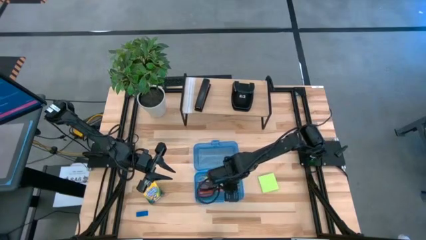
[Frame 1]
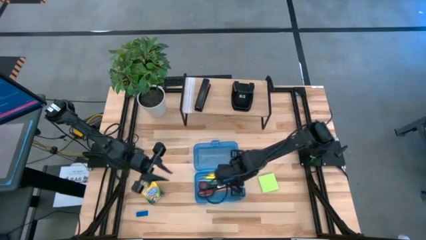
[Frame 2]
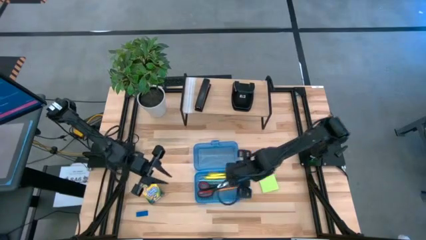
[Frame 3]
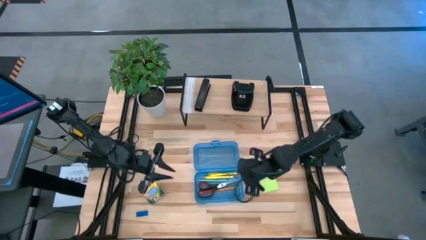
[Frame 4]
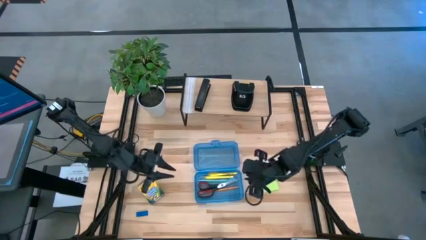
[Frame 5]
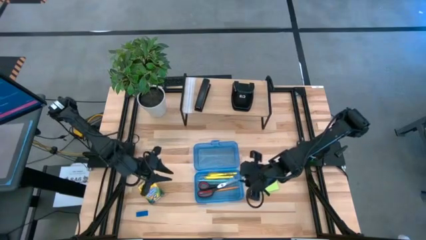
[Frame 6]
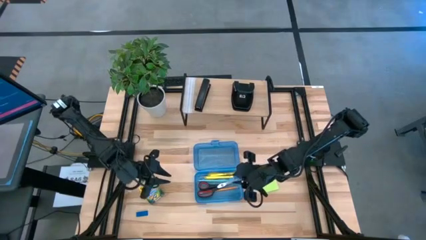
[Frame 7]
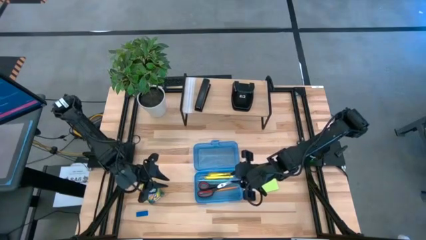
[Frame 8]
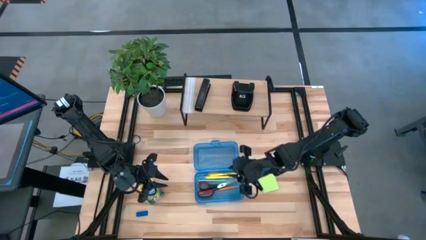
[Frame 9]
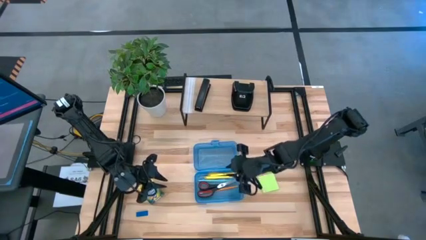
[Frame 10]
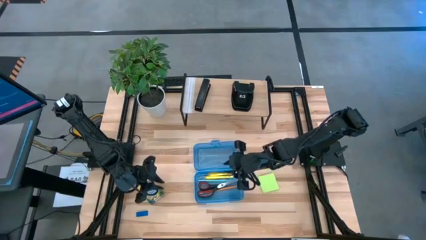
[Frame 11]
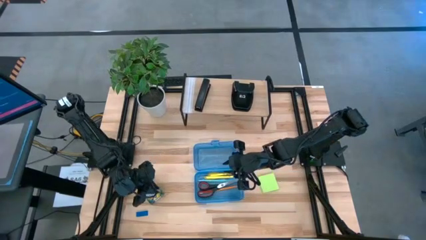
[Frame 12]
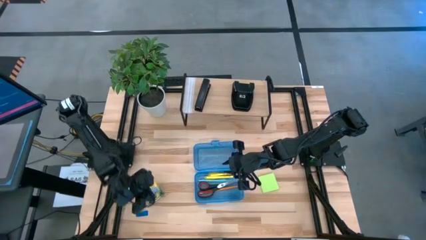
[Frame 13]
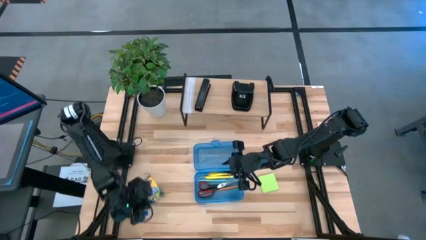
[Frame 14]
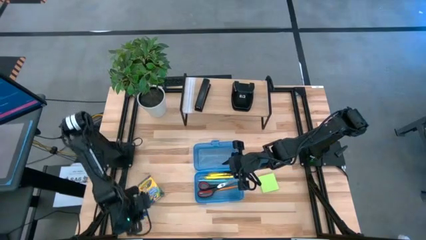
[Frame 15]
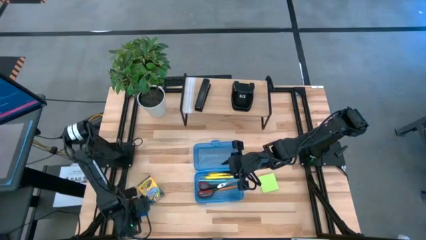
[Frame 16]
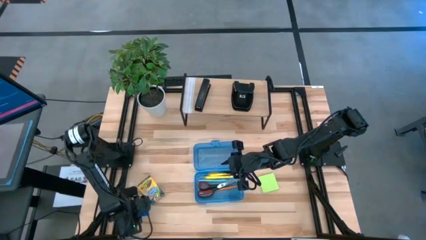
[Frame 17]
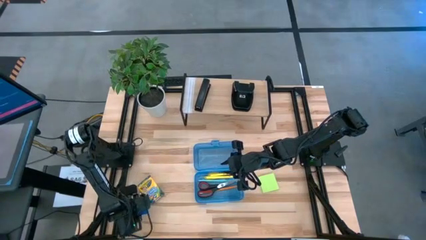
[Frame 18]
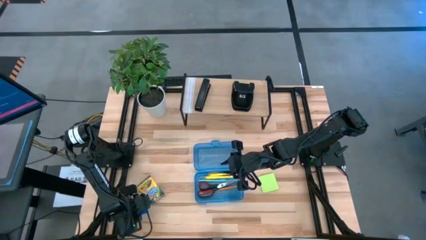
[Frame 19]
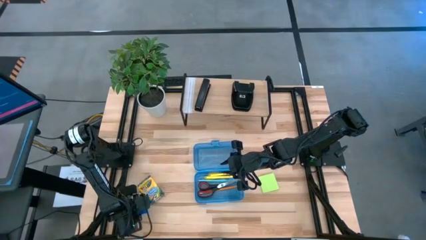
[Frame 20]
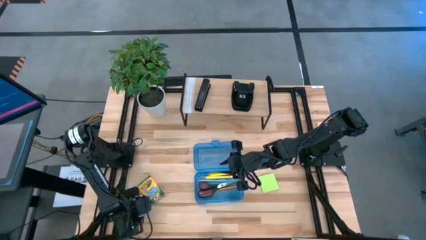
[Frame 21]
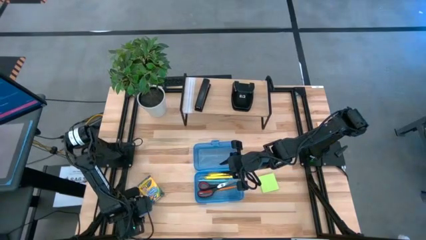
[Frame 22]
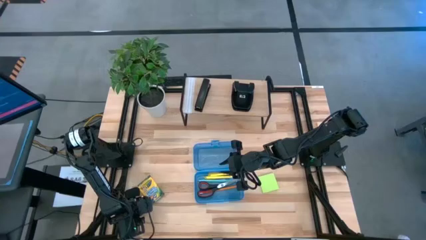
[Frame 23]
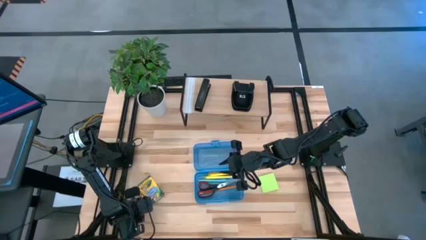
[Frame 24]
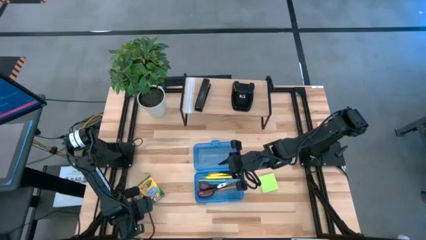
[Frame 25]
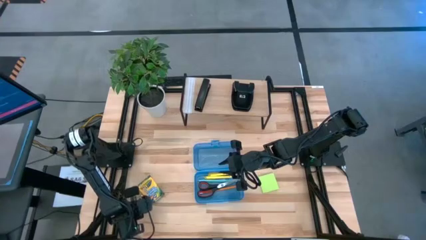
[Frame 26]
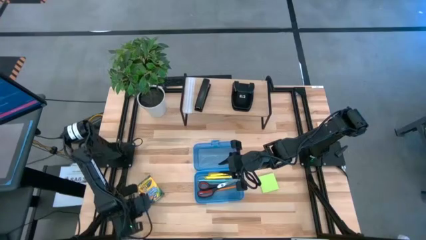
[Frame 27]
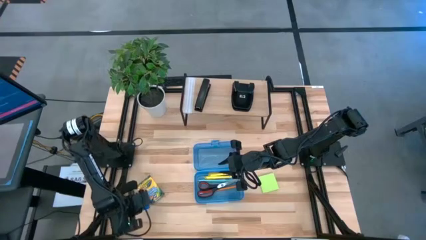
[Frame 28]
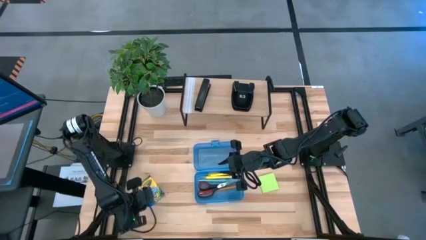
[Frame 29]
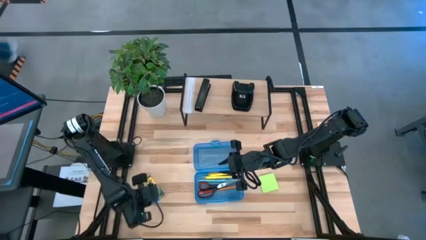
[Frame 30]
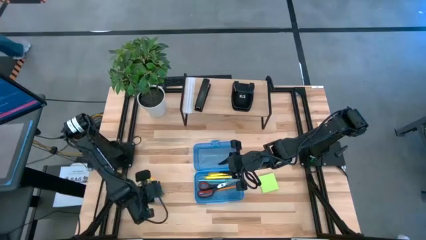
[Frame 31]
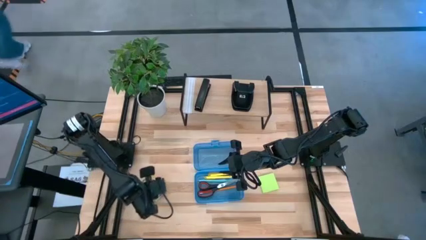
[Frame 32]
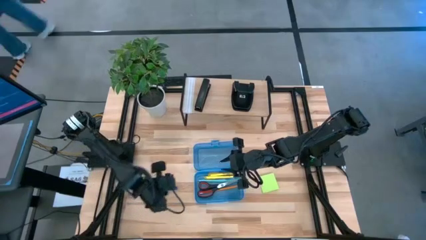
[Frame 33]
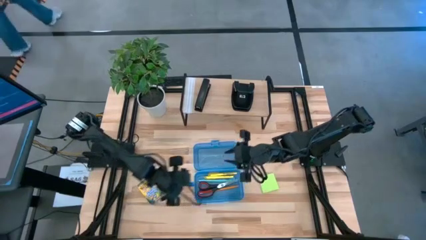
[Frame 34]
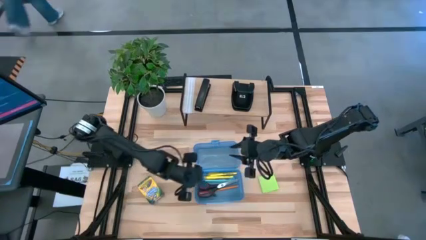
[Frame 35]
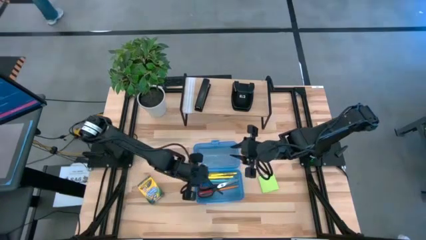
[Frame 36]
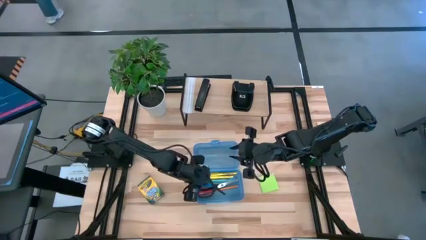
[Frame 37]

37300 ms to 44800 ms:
Task: Pack school essentials
Put the blue eraser into the blue supply box

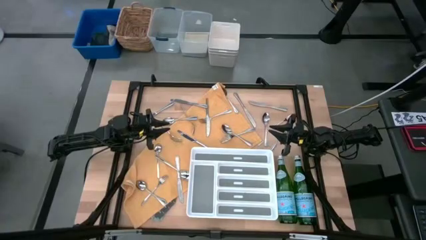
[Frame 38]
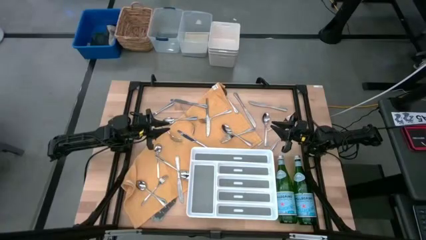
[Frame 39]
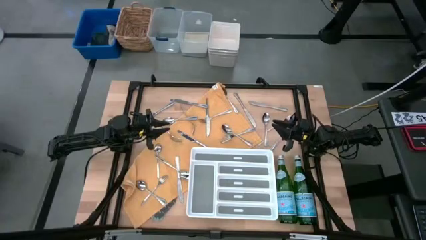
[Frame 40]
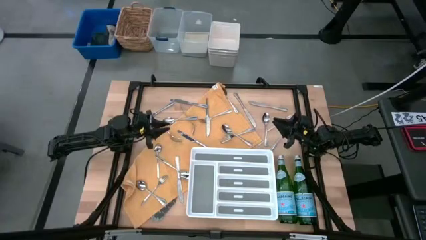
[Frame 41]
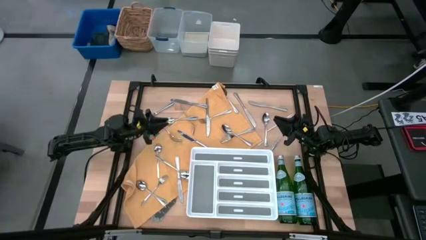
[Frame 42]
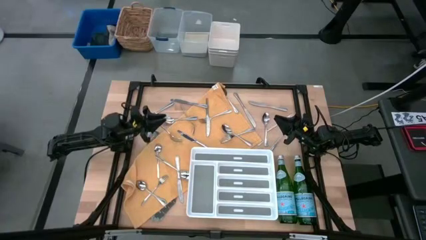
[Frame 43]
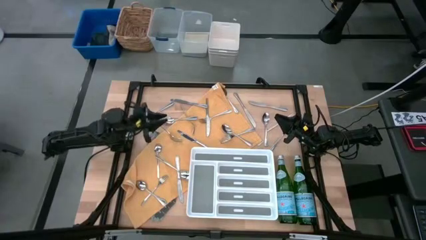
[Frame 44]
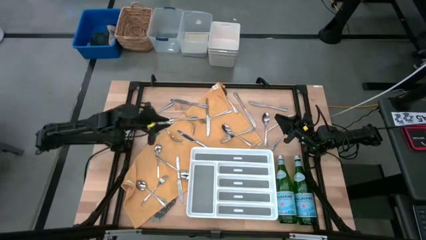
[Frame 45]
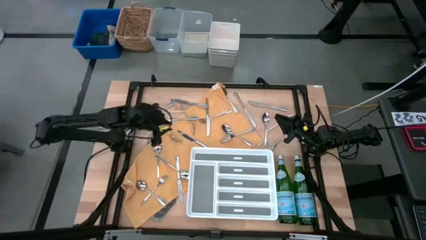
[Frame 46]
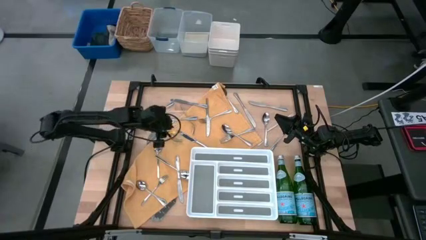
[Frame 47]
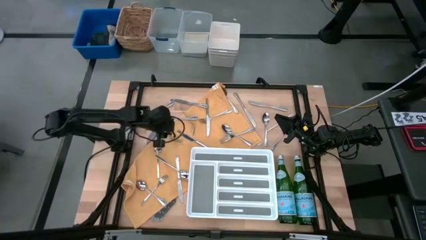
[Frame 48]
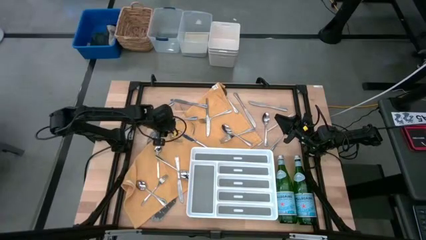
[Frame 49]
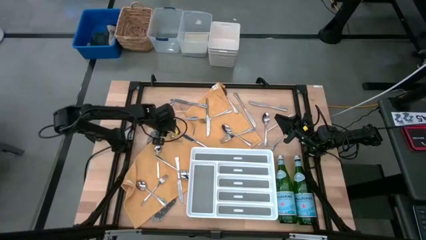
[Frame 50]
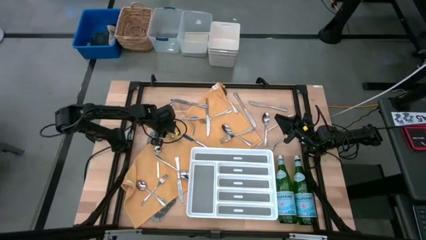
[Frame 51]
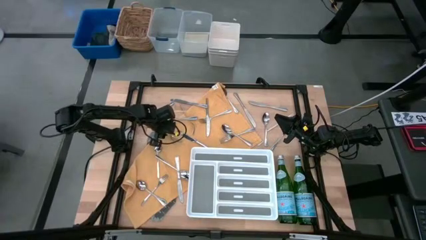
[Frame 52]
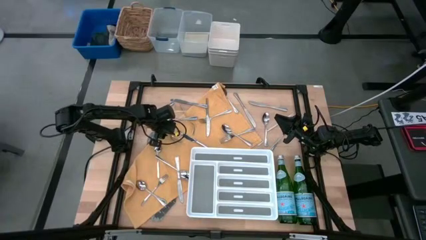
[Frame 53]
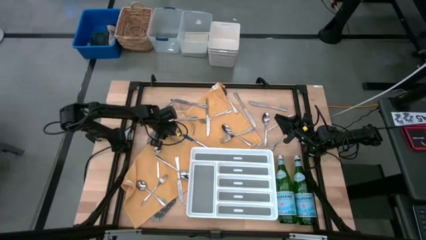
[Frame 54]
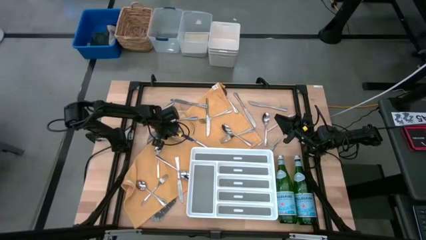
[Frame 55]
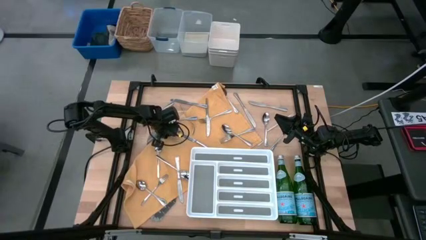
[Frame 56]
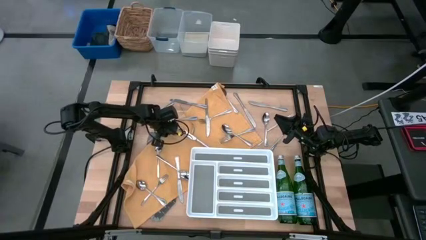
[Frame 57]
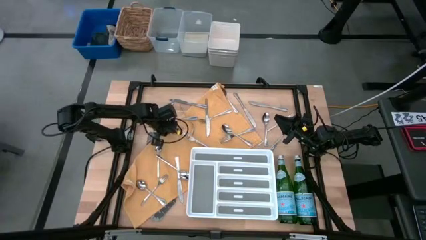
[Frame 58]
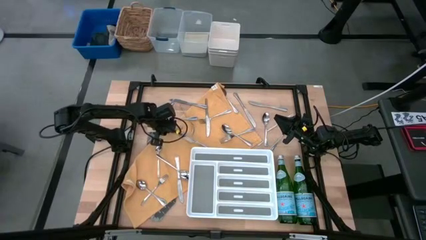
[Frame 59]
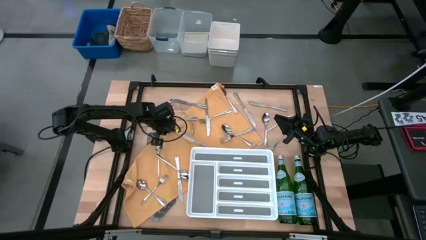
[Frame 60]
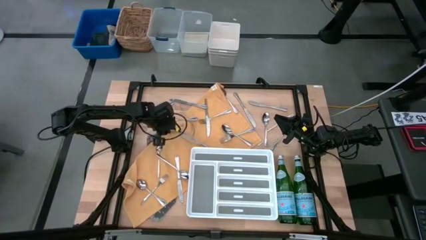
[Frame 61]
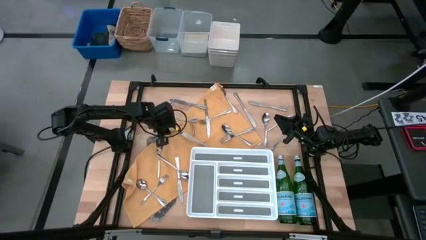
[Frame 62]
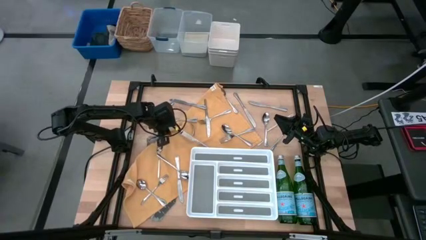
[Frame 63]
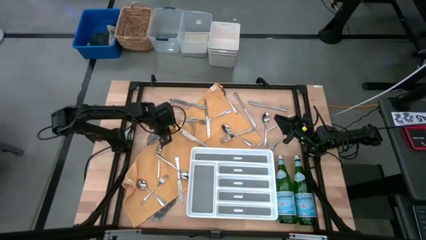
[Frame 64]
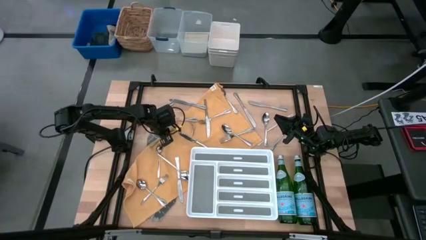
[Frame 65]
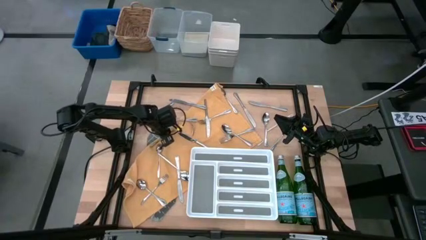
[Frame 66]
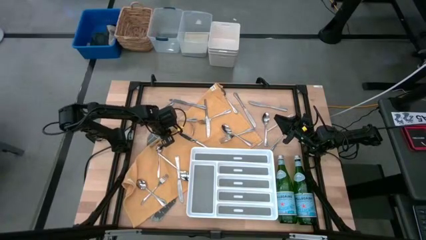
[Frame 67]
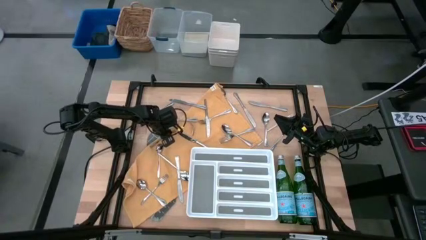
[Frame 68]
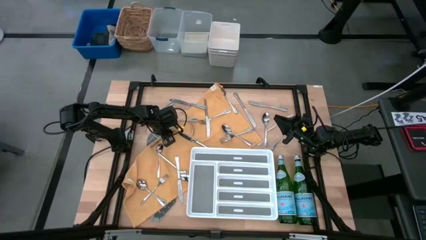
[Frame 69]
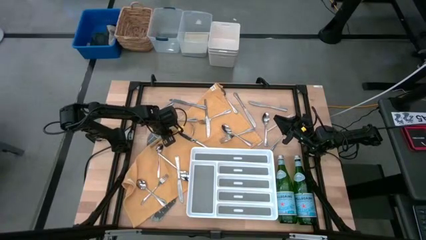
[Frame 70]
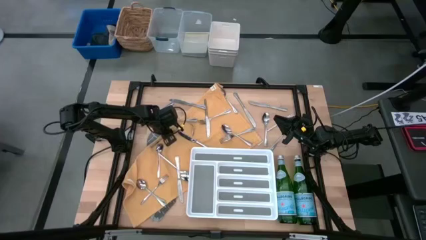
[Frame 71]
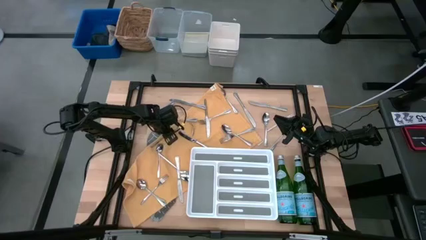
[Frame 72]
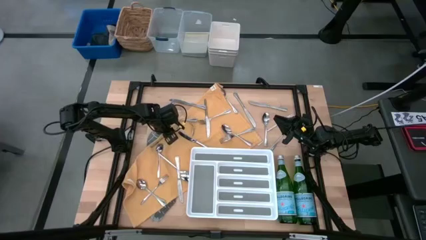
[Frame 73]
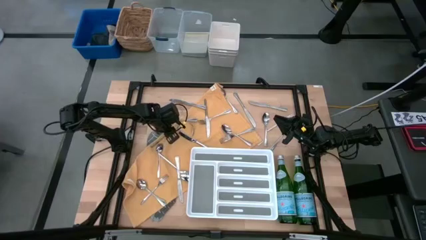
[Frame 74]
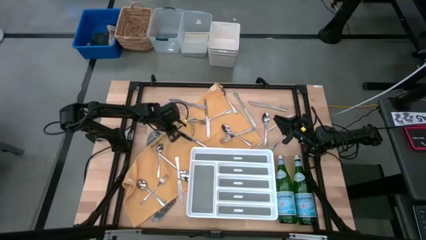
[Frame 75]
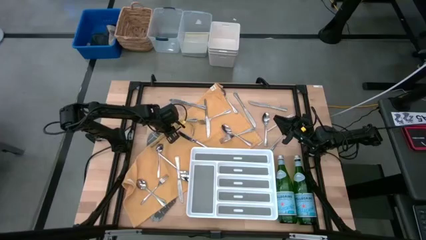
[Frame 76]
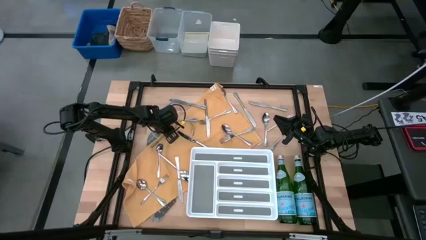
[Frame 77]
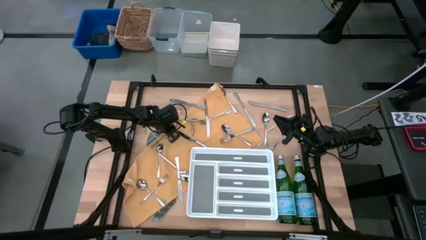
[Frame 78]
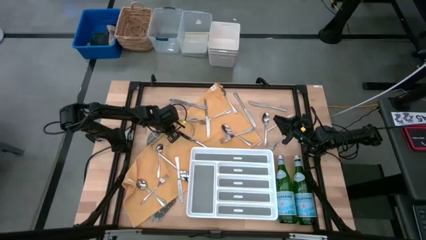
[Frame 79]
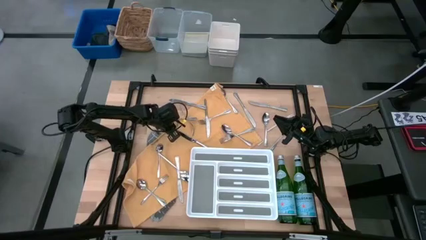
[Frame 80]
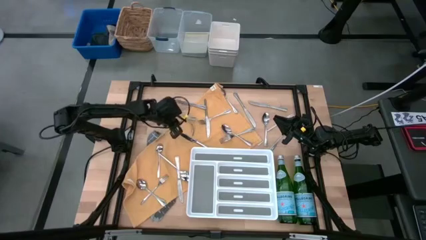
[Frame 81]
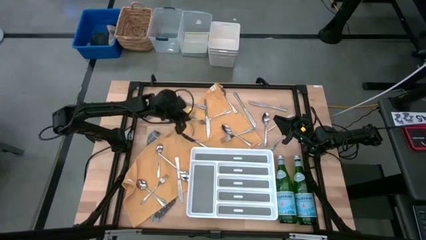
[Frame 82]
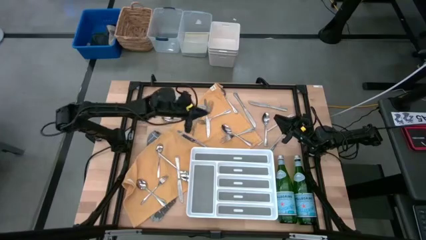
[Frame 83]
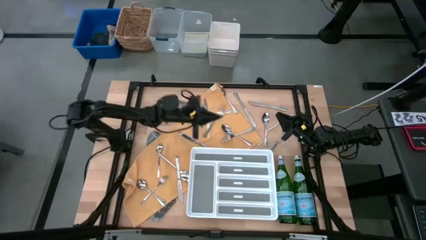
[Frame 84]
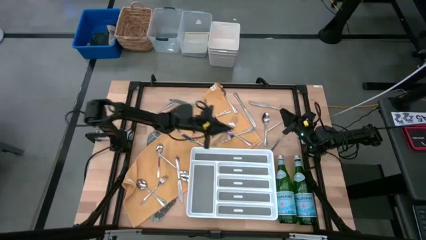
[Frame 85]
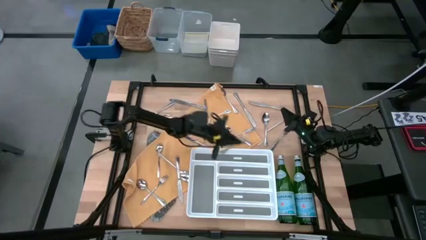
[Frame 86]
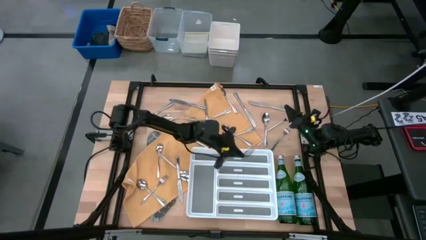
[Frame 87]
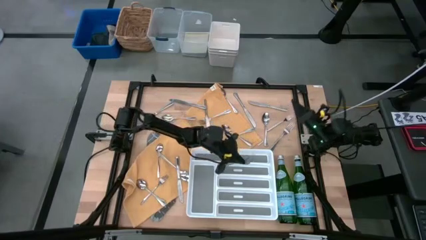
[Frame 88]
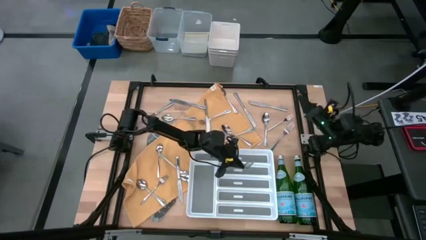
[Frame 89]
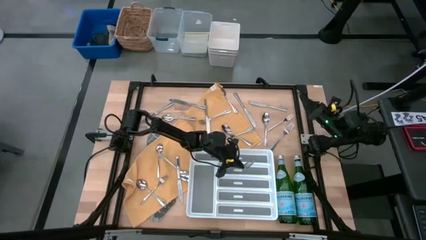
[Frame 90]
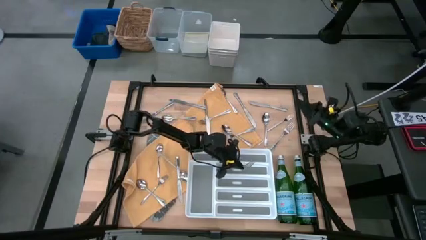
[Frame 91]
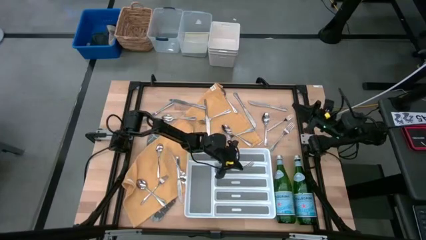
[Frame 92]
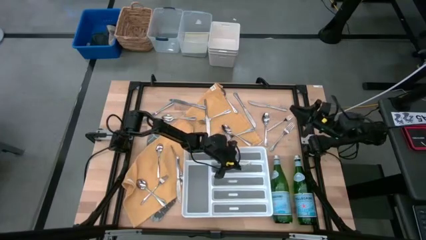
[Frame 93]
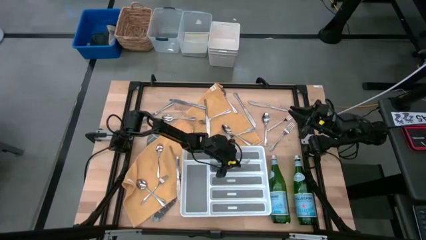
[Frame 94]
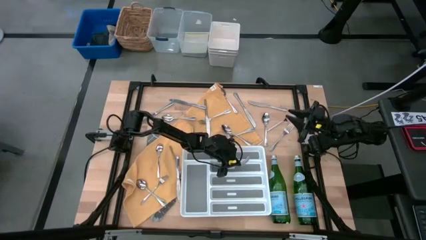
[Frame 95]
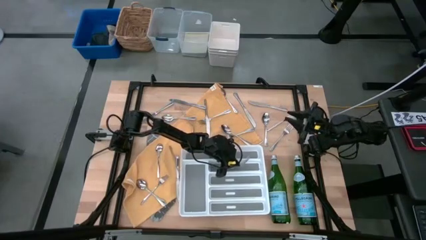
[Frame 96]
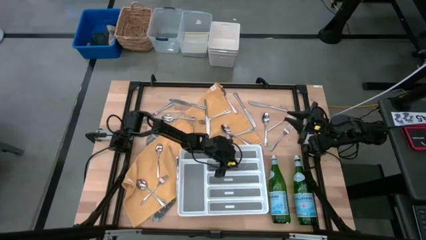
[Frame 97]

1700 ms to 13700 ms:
Task: Sort silverware
Put the silver fork into the white silverware tray
